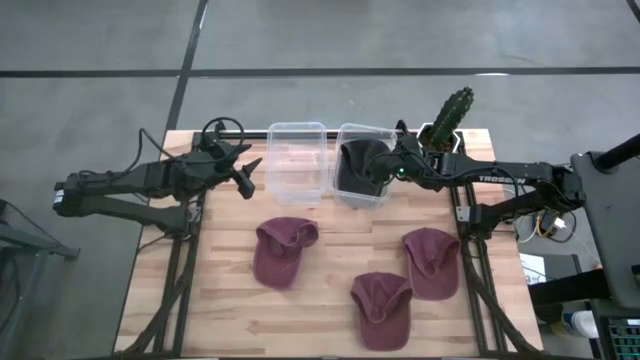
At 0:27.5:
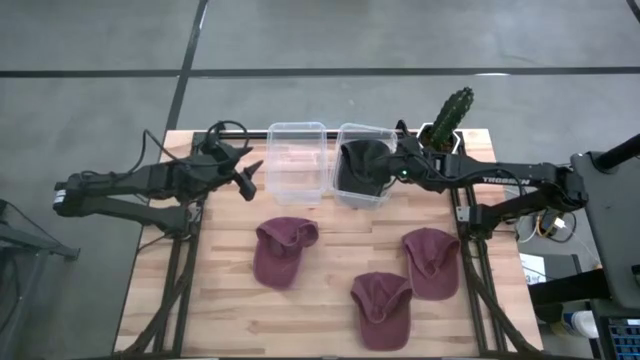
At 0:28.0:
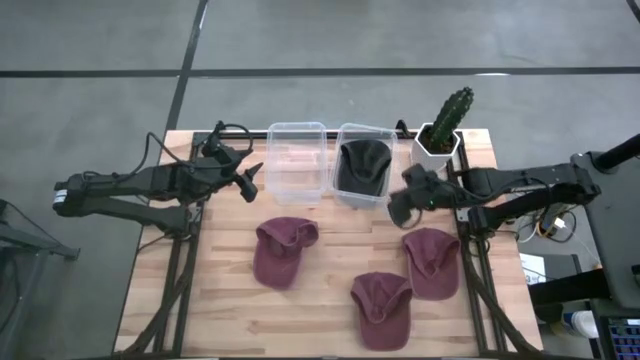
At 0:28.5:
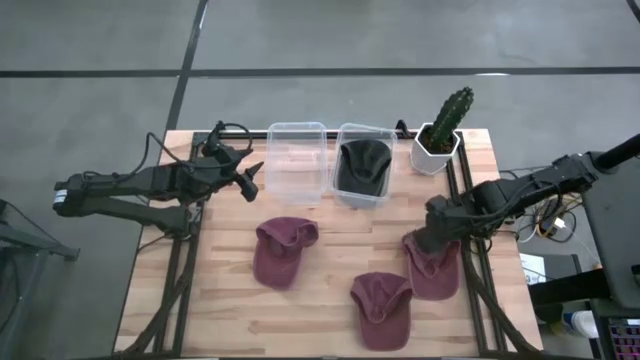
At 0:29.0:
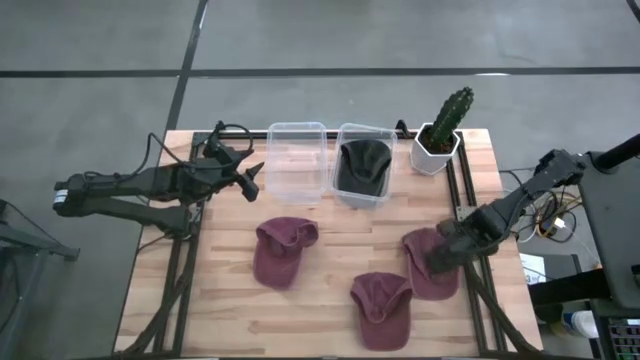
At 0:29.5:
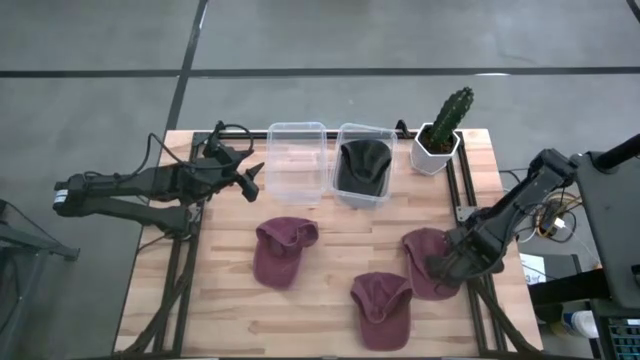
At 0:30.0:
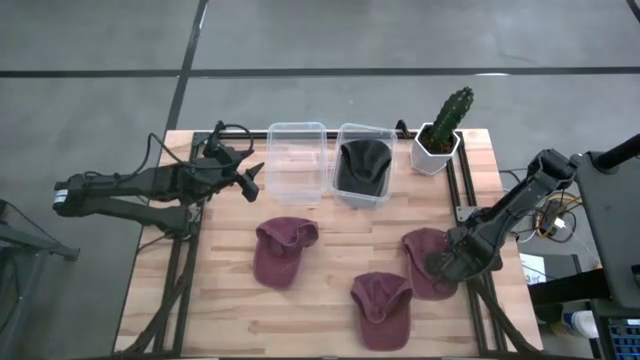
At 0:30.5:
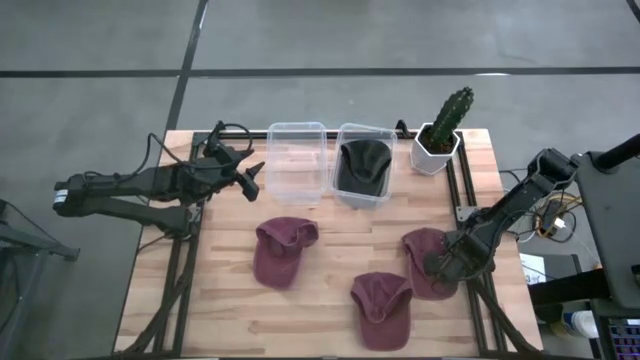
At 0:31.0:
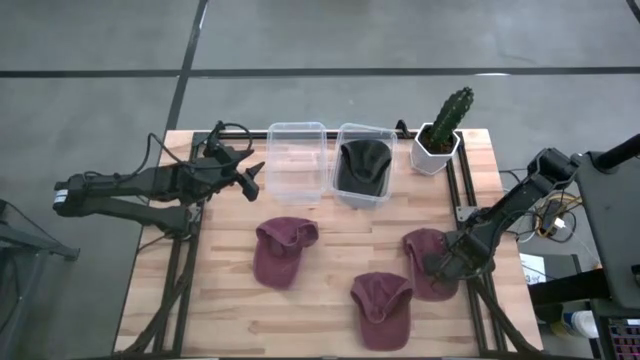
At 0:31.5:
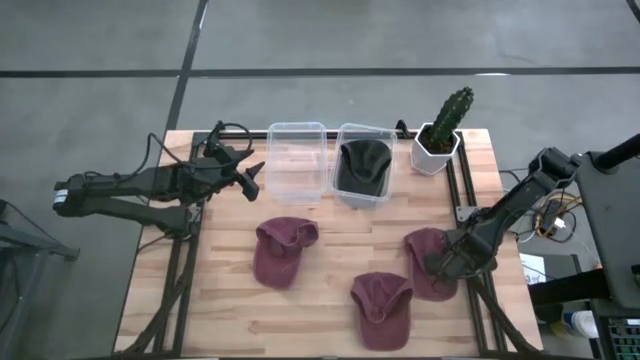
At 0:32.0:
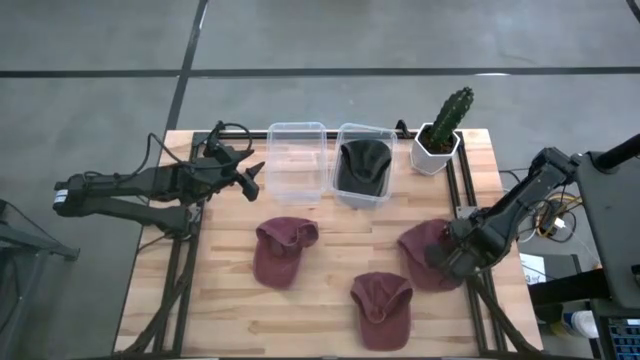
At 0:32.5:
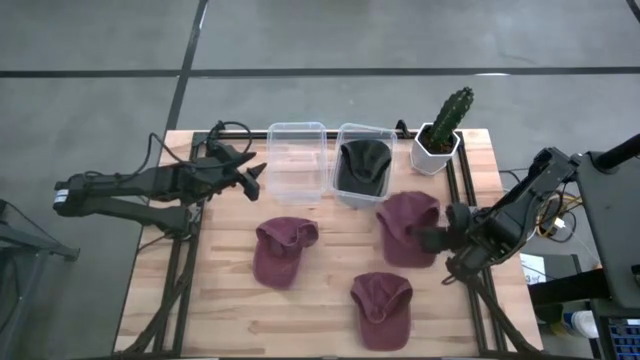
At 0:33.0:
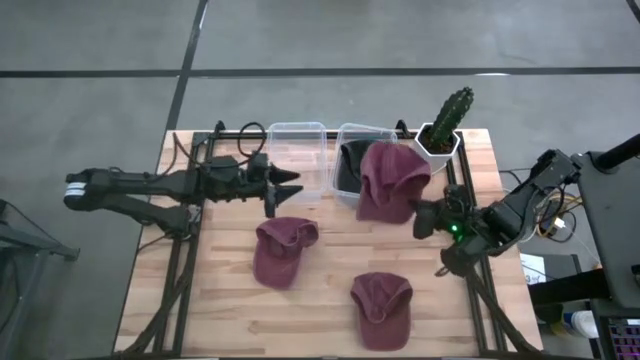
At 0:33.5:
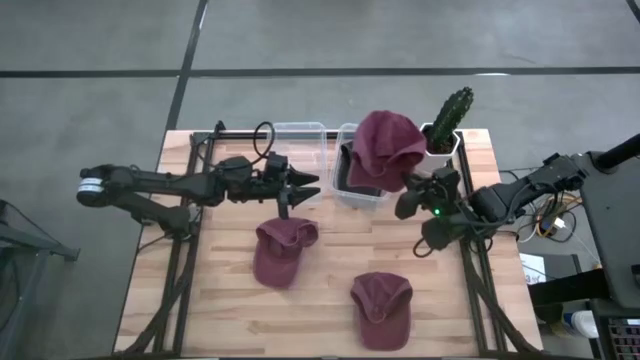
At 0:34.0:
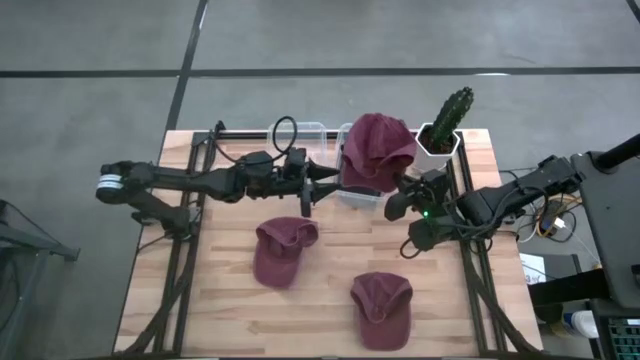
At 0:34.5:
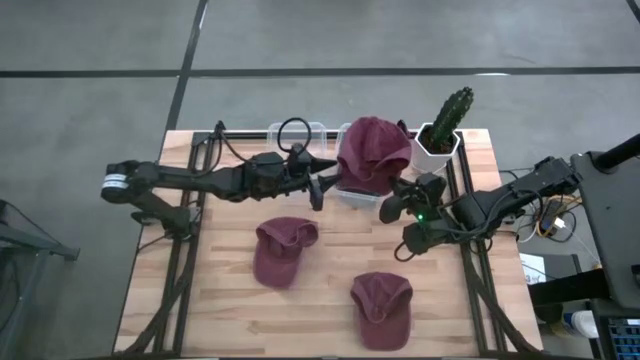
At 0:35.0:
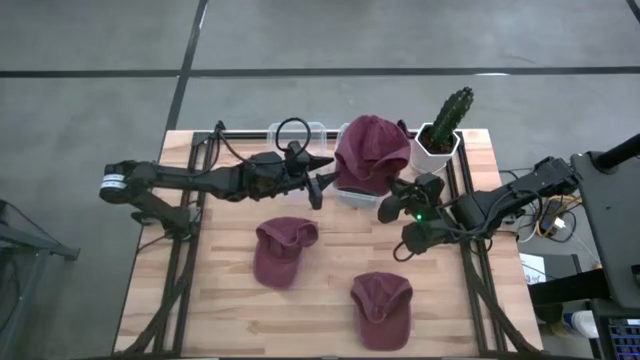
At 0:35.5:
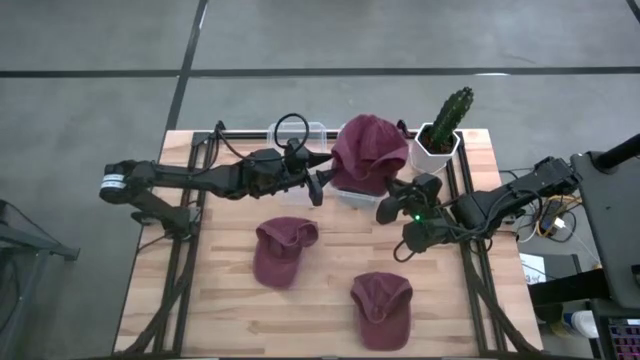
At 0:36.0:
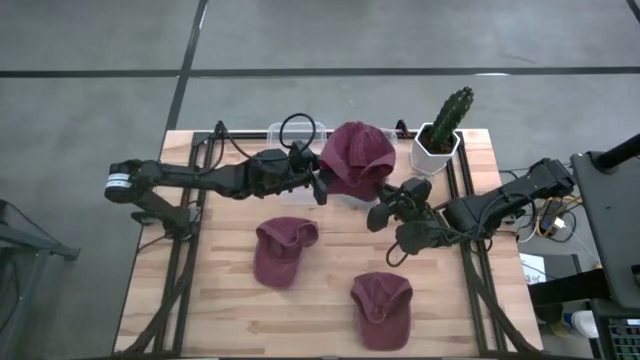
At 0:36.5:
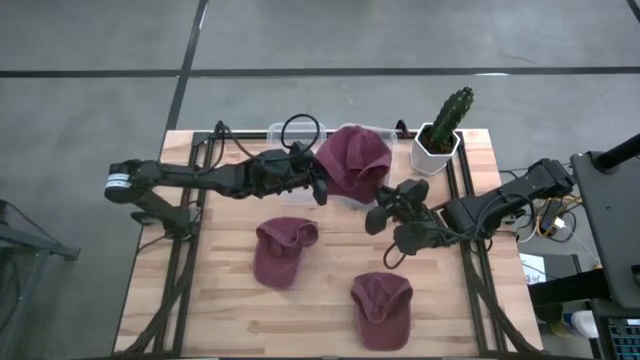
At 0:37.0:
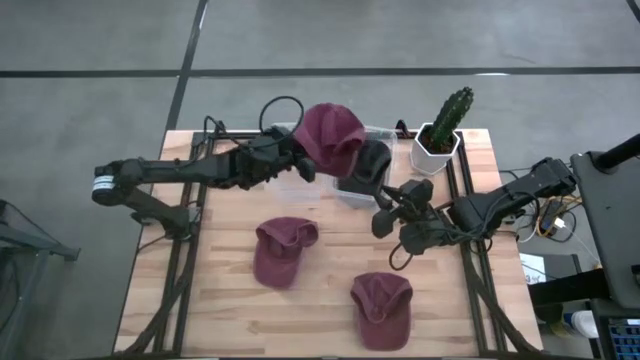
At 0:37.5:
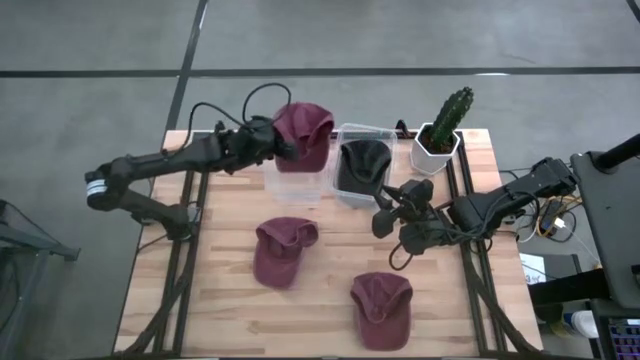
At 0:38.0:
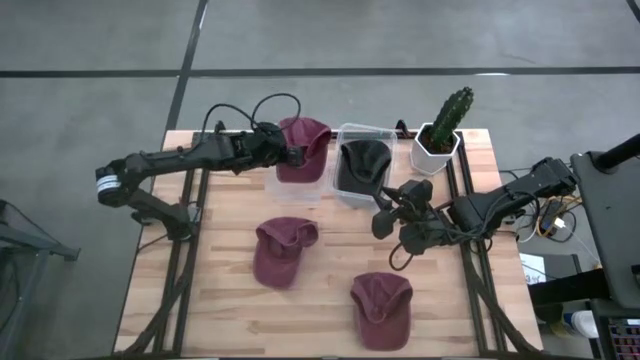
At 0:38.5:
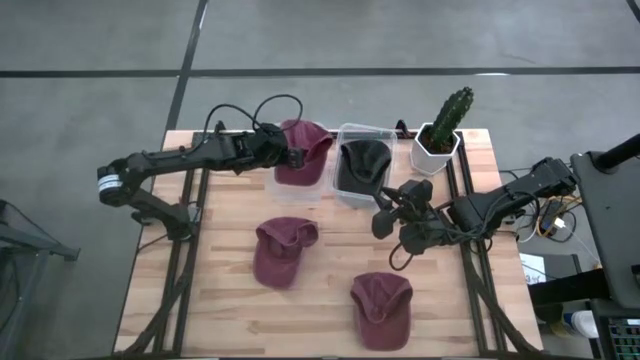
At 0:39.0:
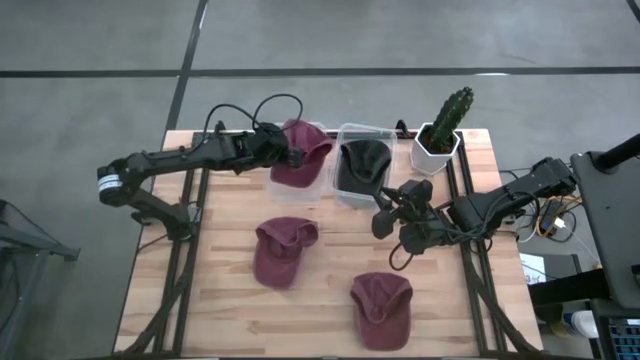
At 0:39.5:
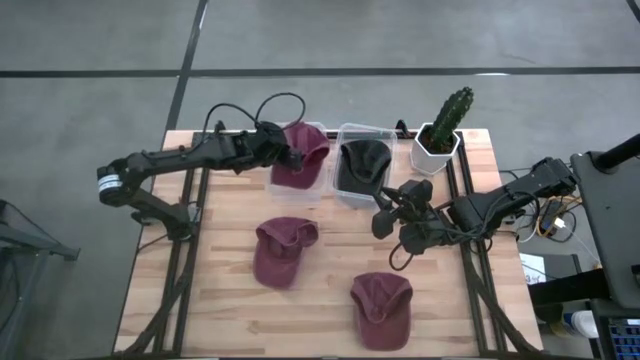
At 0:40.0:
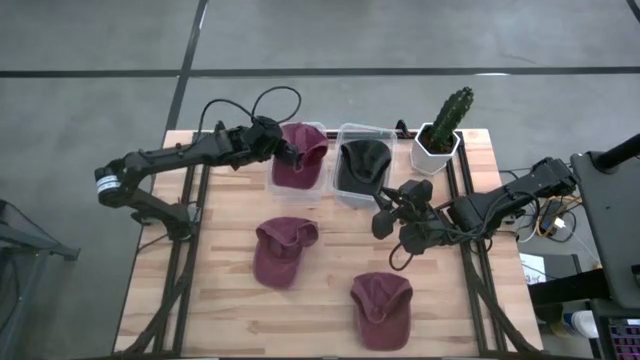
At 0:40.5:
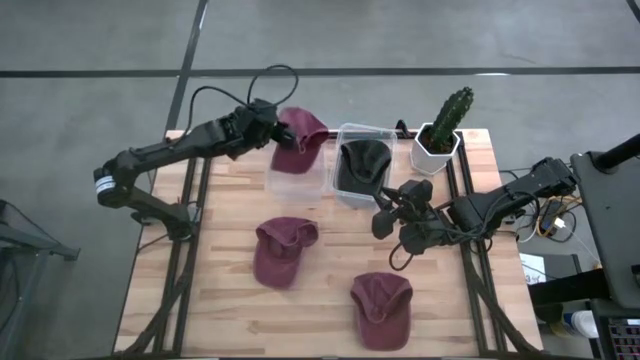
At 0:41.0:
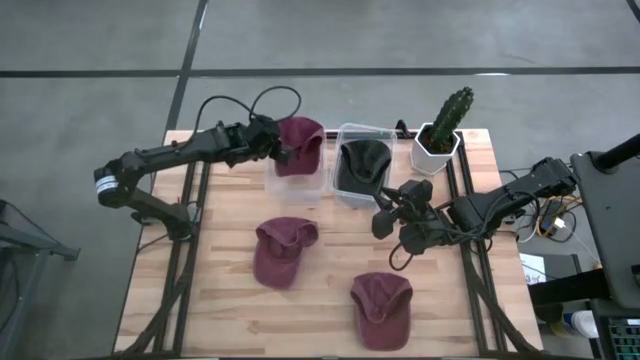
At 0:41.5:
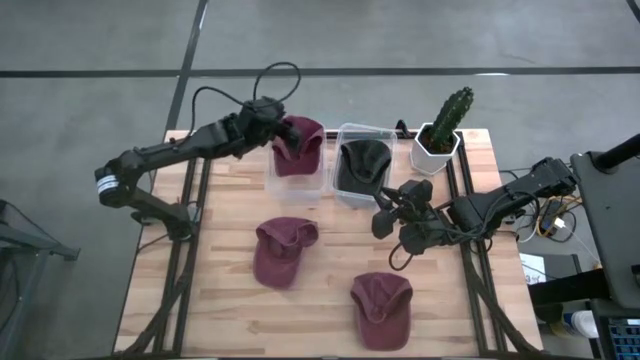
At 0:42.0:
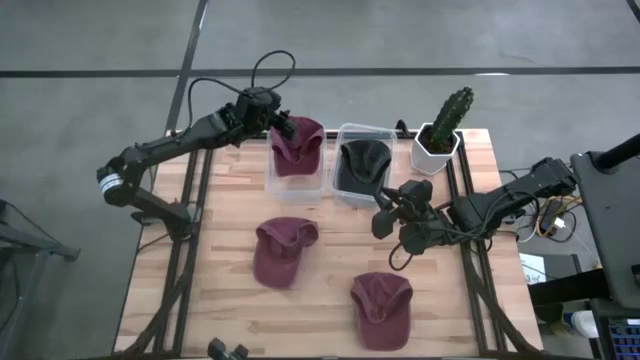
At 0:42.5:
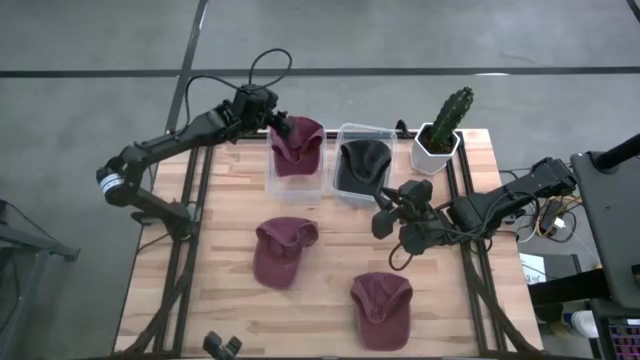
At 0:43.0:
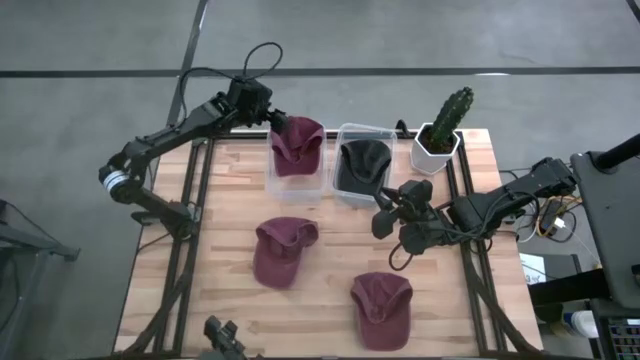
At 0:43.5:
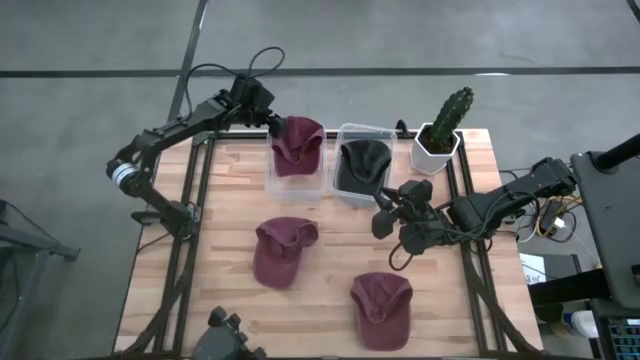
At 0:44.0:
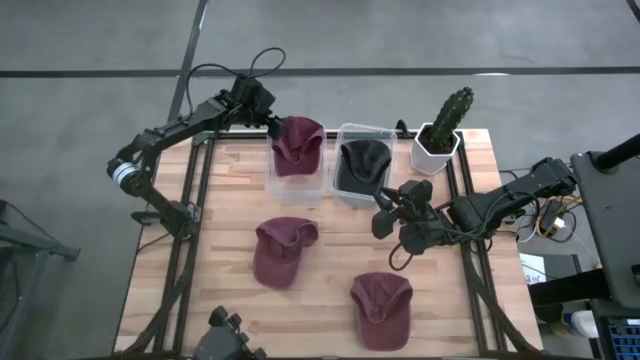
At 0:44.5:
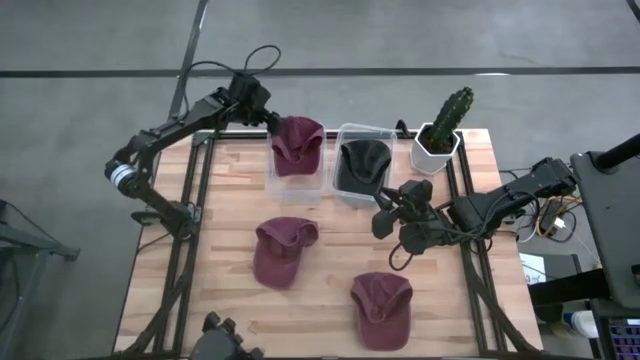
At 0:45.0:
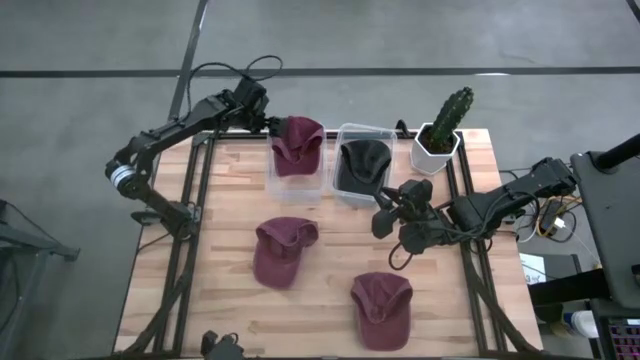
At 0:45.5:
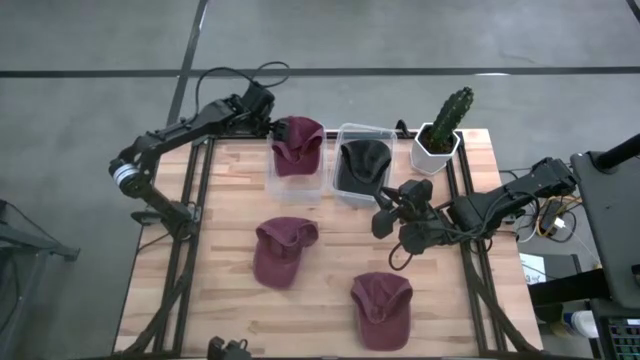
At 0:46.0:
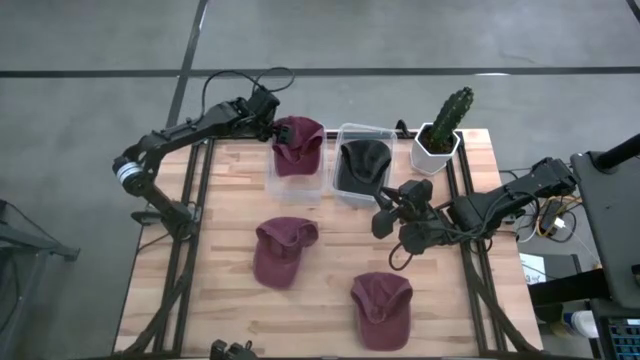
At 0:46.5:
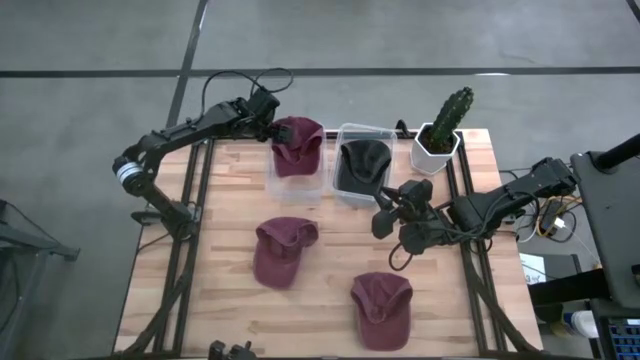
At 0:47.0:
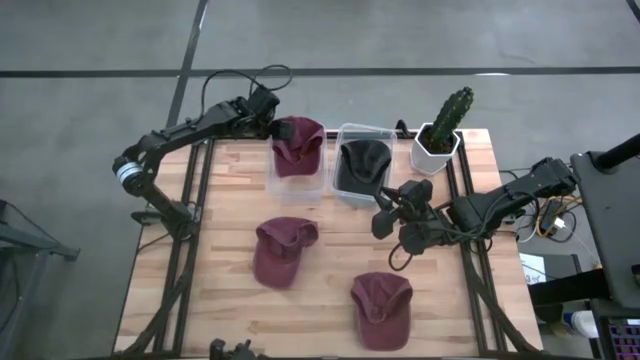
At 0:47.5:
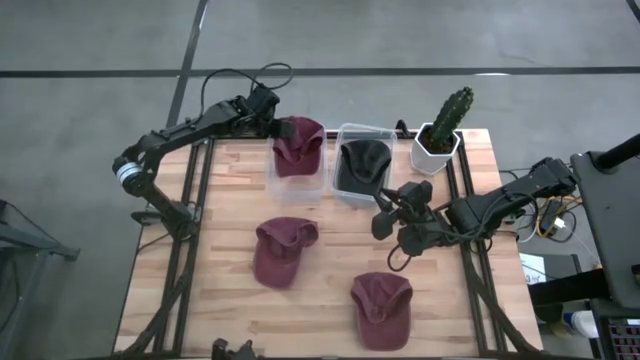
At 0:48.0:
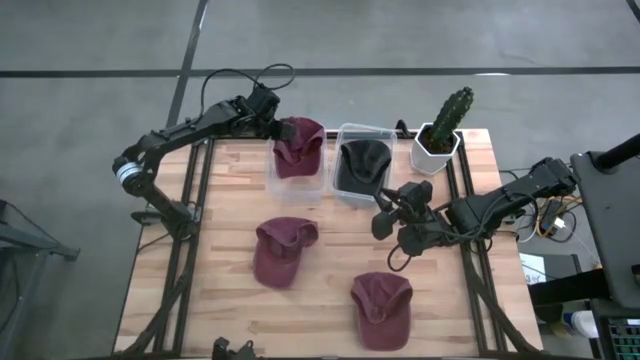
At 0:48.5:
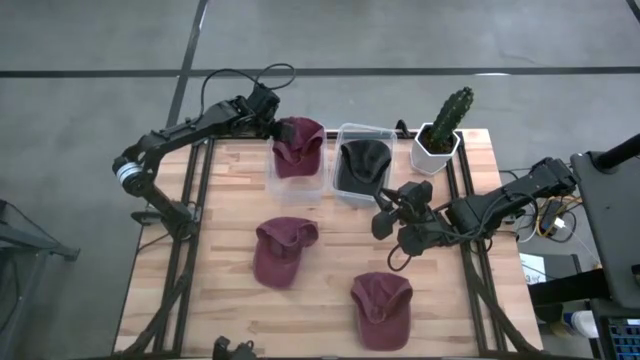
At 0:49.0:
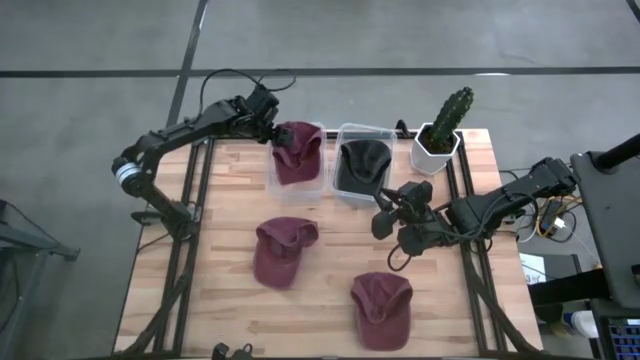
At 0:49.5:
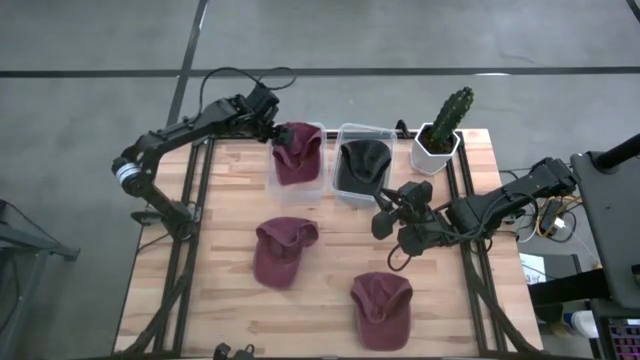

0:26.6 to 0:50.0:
Task: Pick & Place hat
Put the right red cap into the left transparent bin
